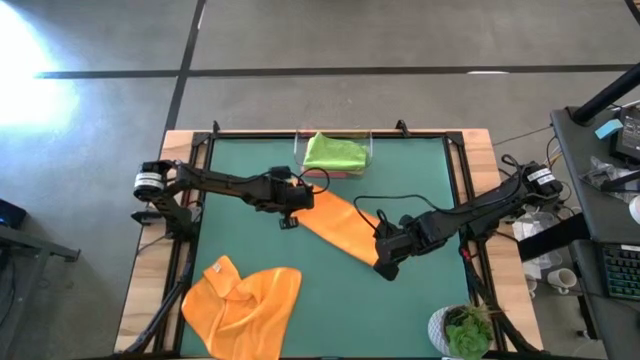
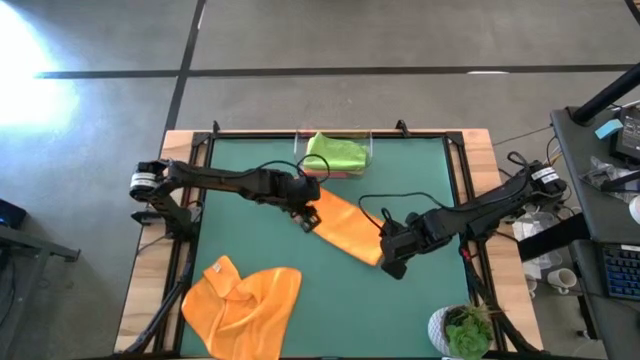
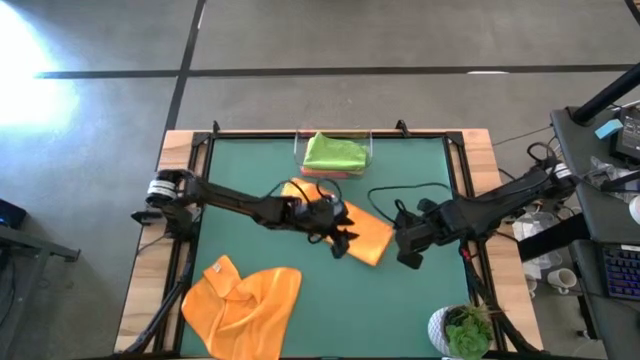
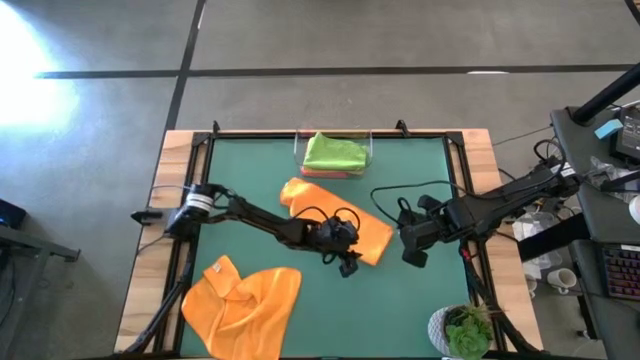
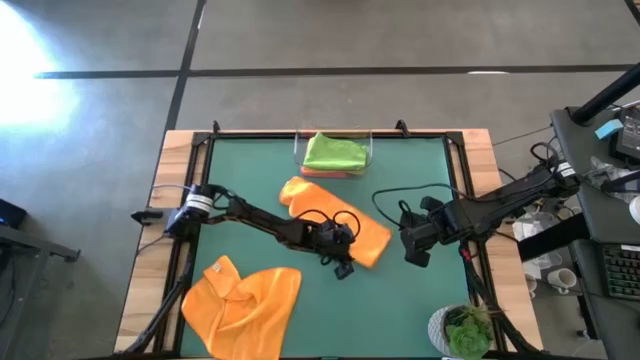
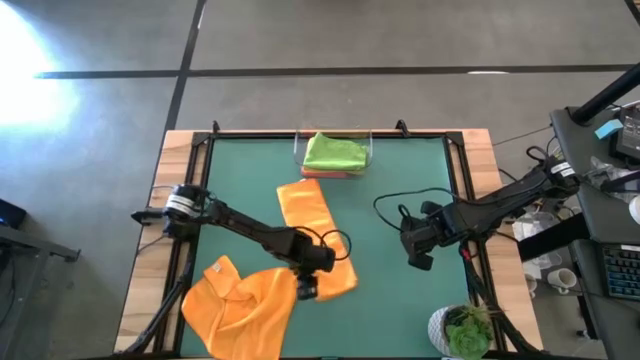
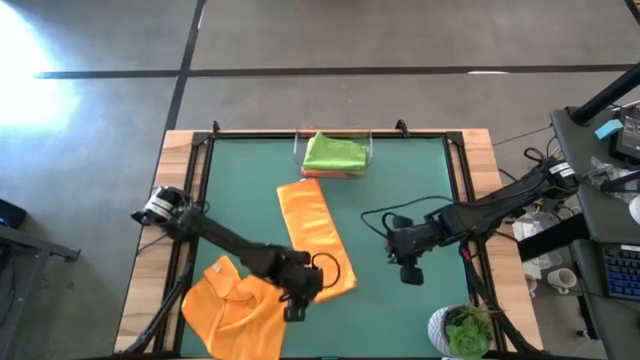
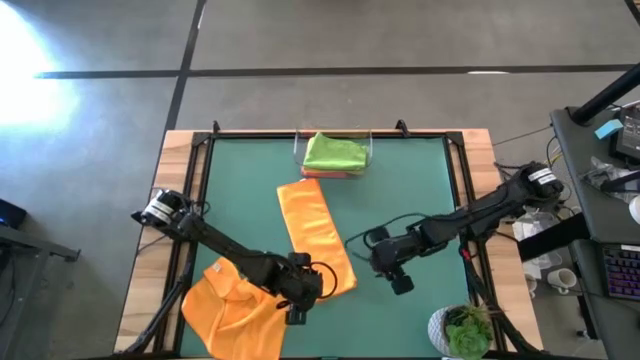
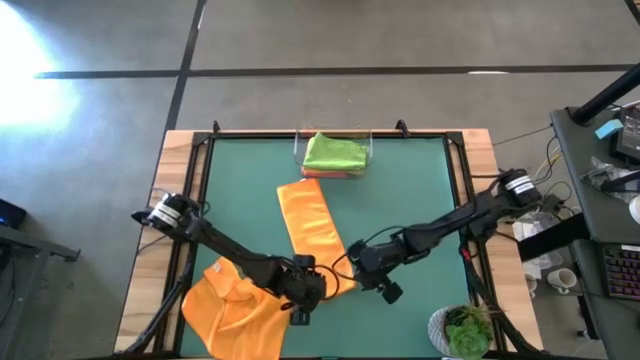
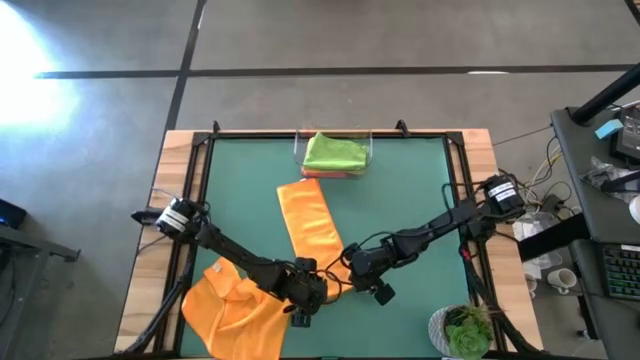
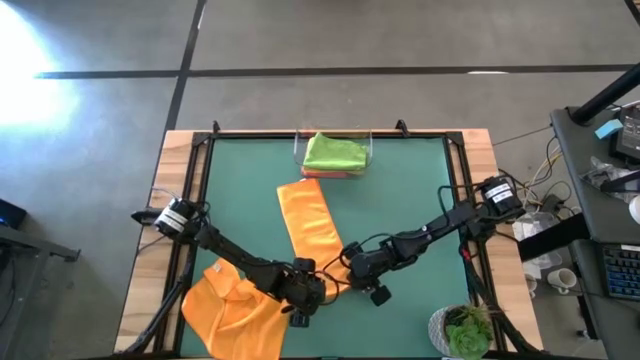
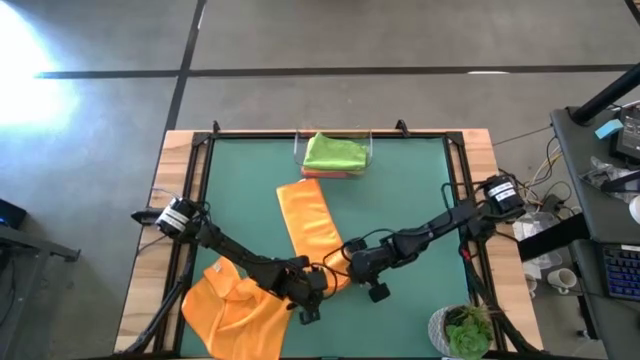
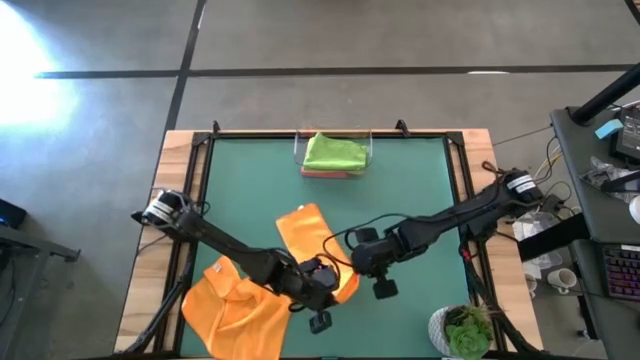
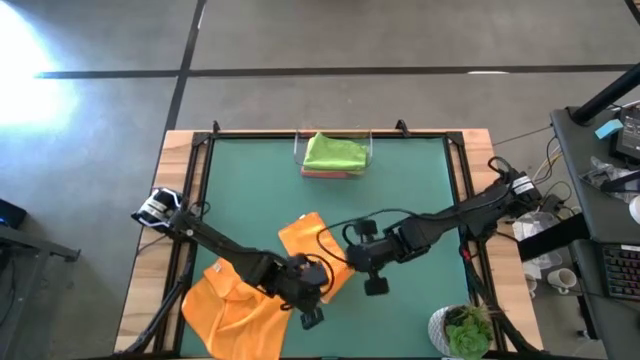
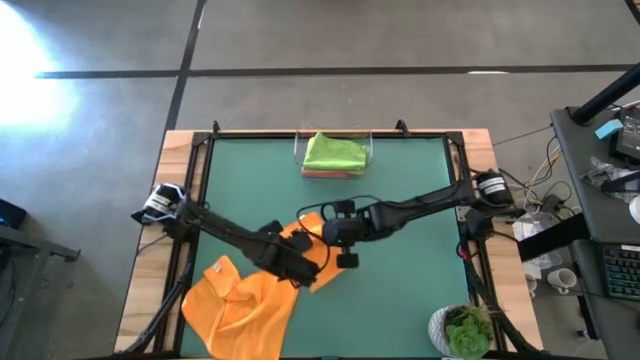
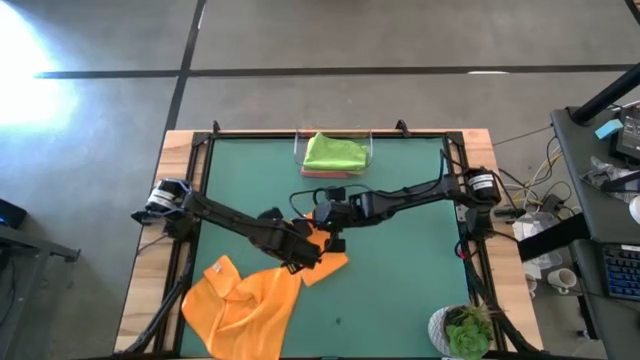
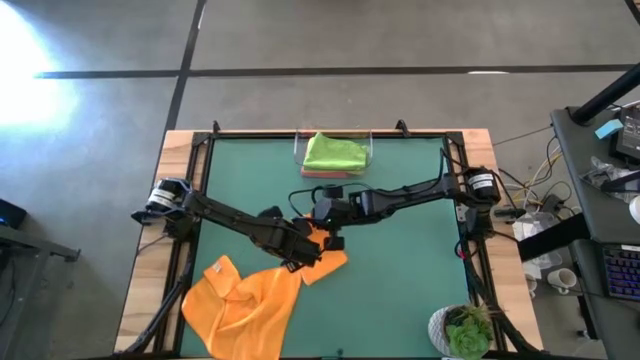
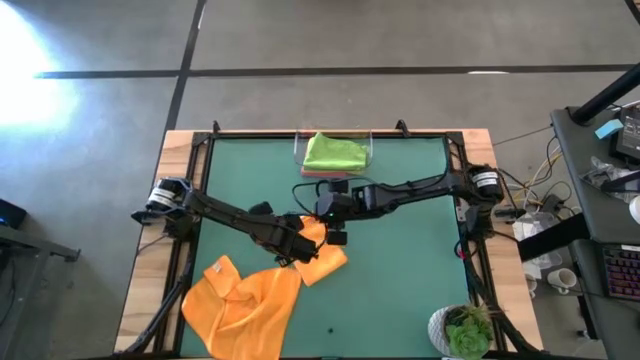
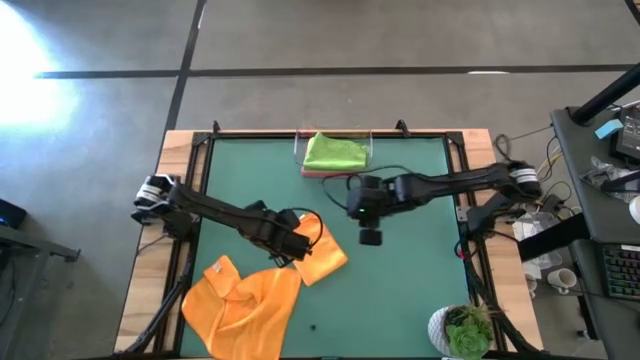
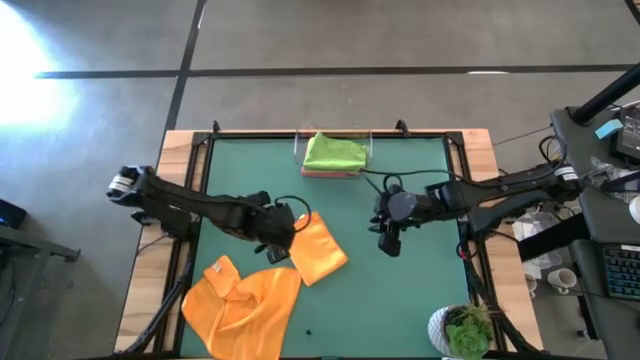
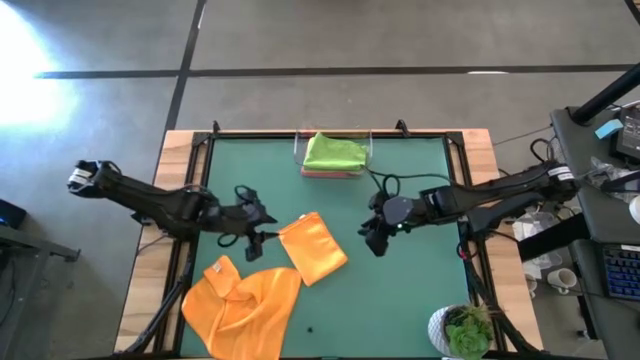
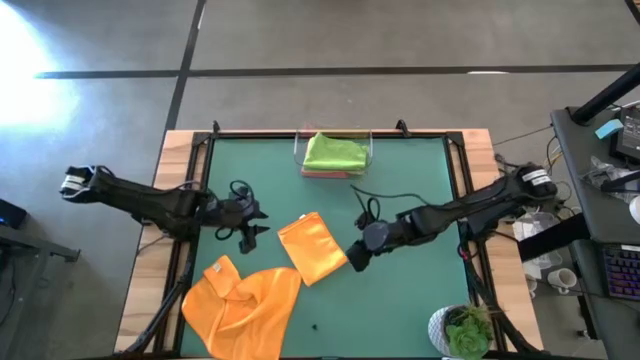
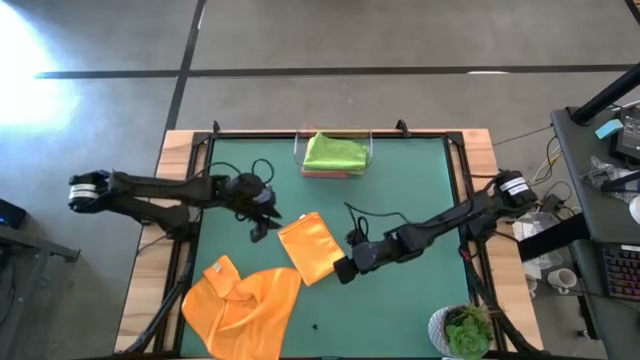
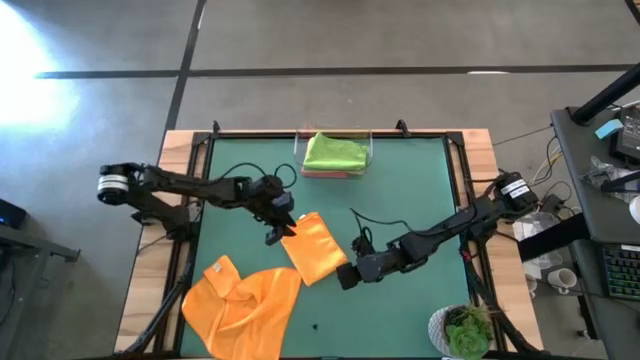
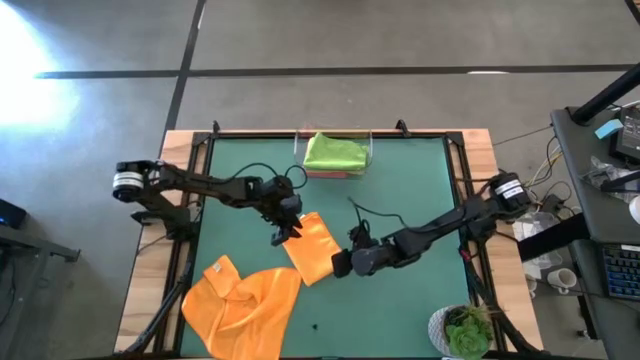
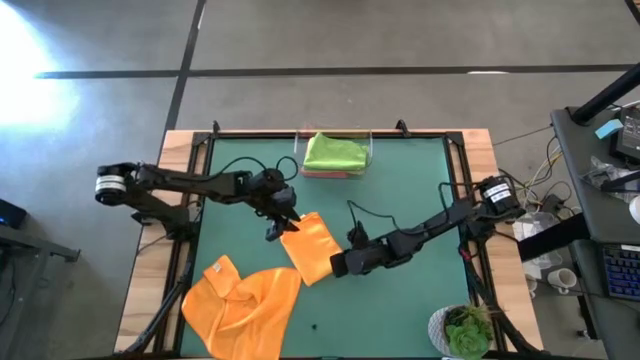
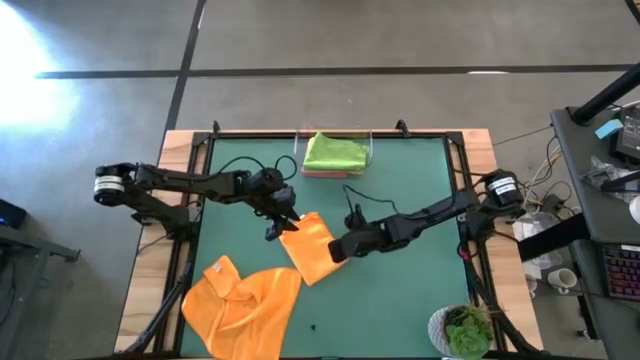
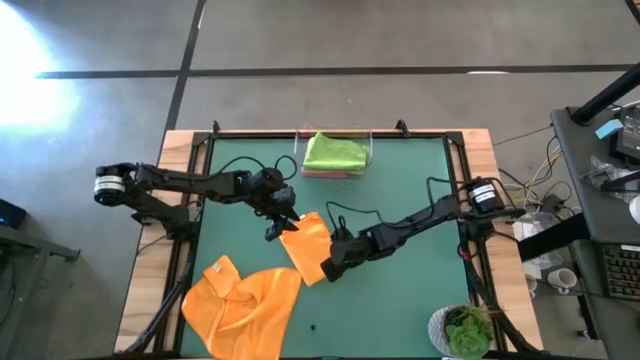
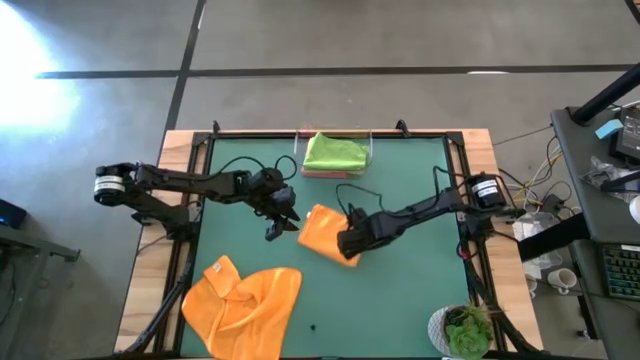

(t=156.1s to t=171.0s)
Task: Fold microfiber towels
Fold the right orange microfiber towel

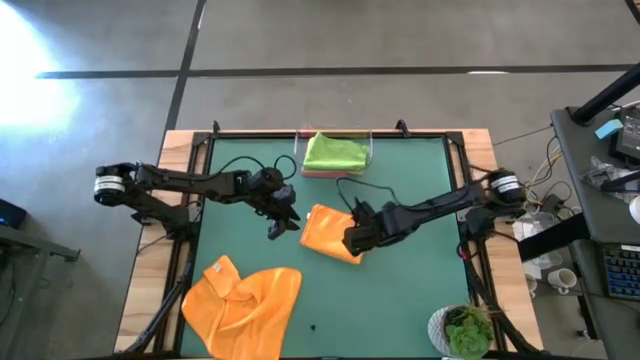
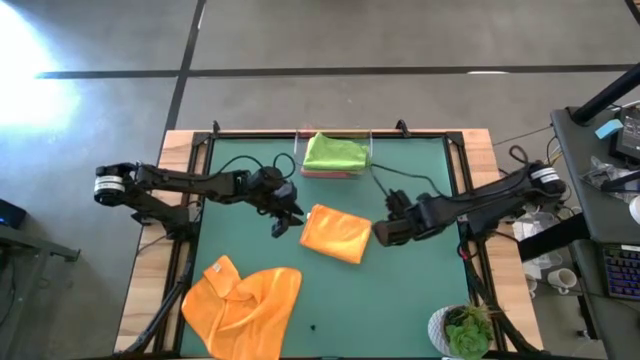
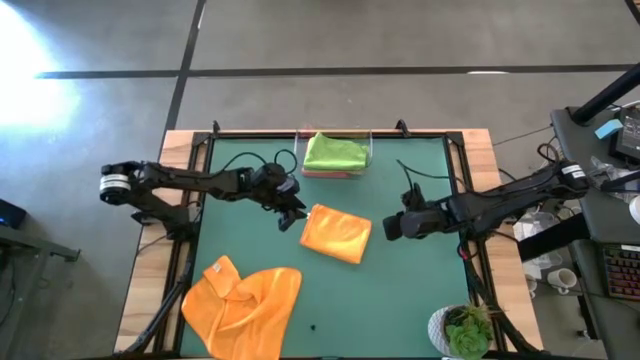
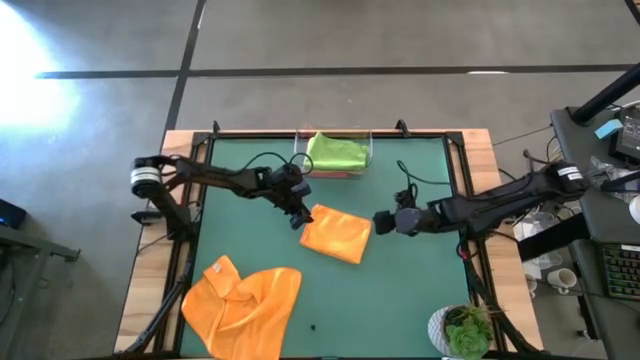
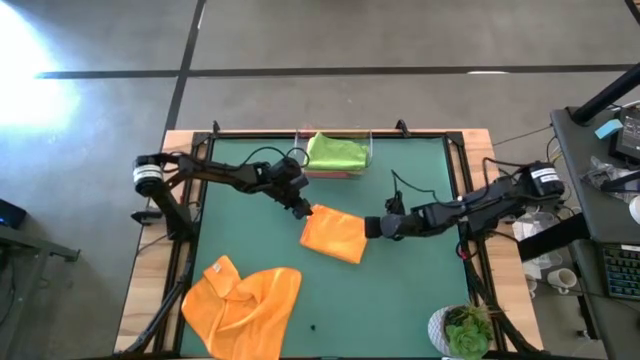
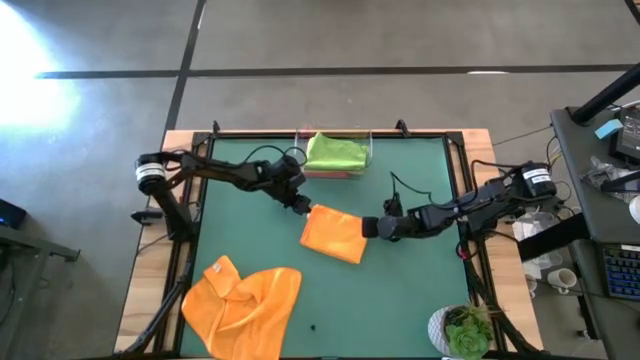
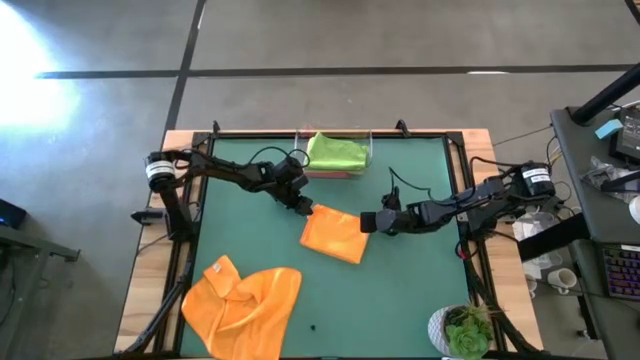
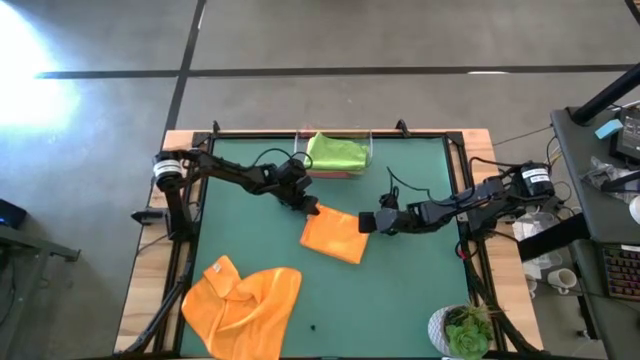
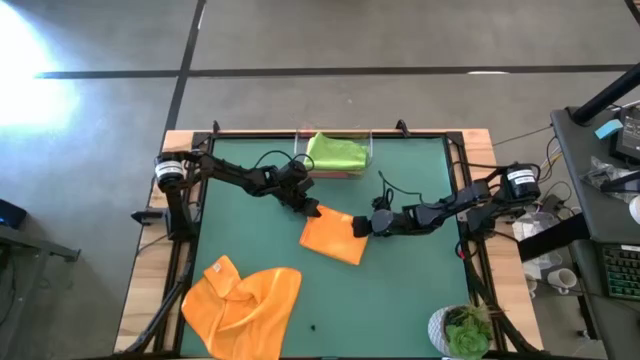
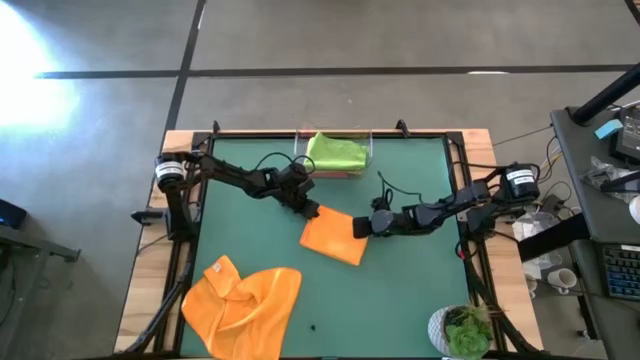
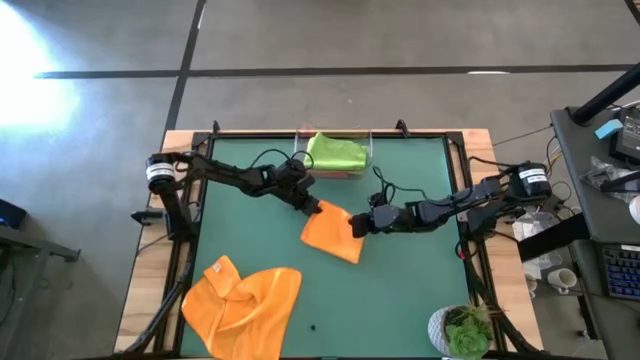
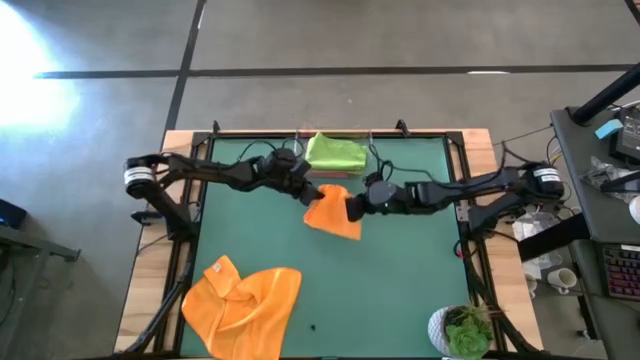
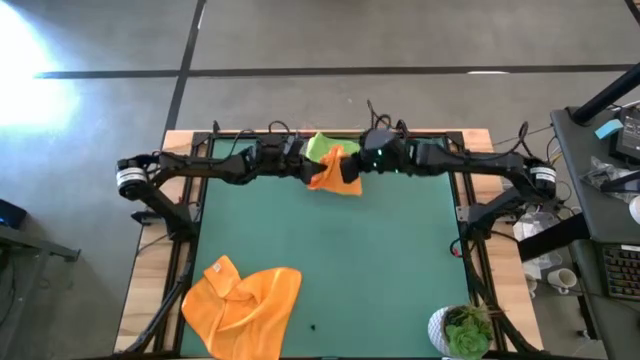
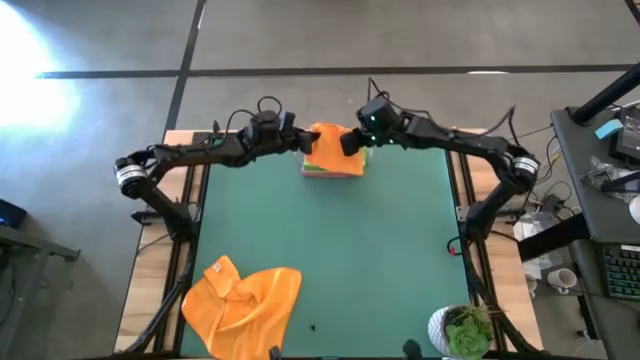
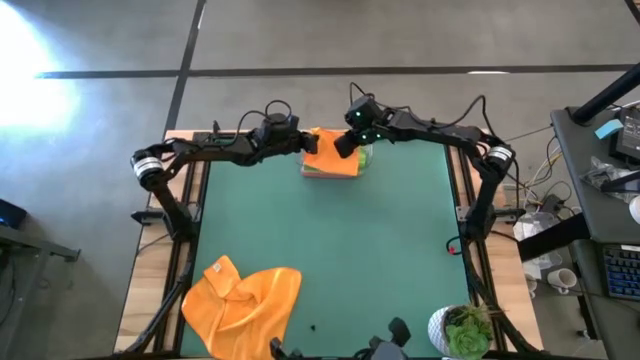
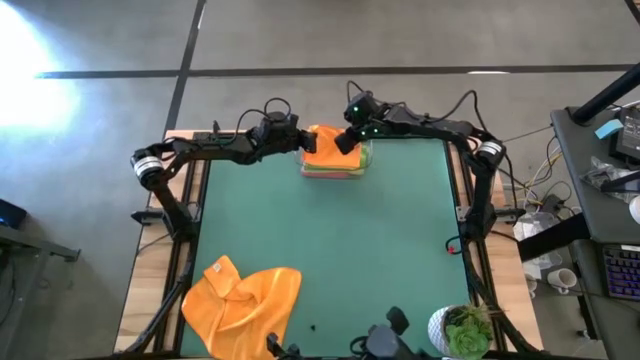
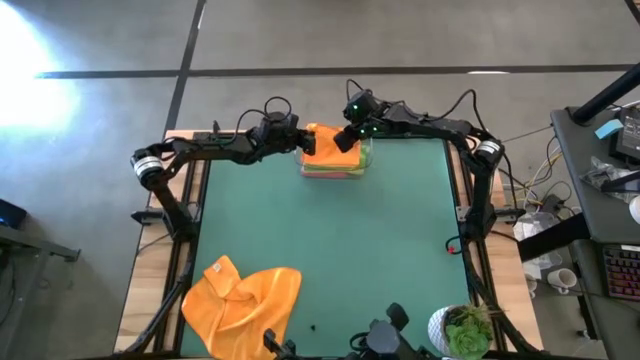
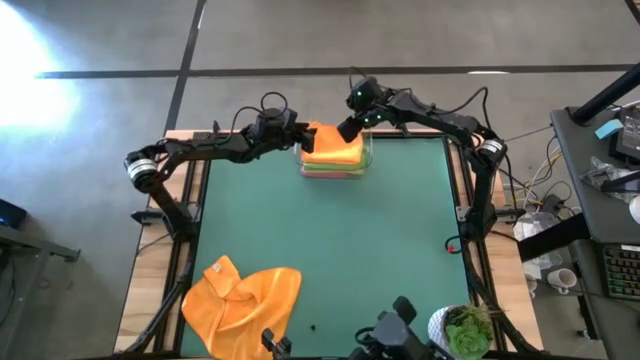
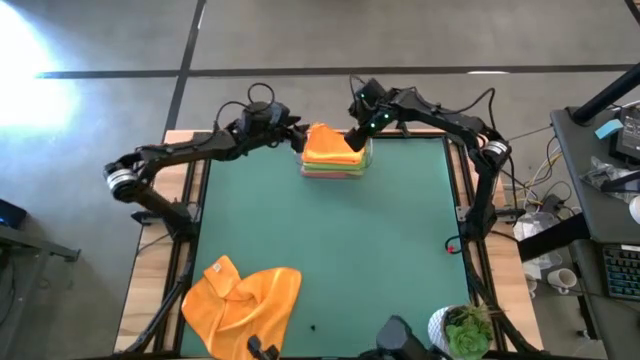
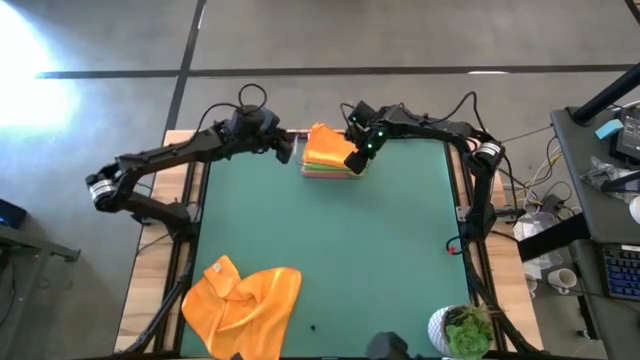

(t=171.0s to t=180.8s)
Put the top orange microfiber towel into the transparent bin
